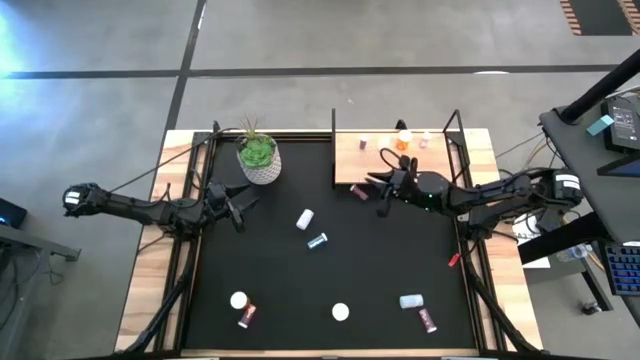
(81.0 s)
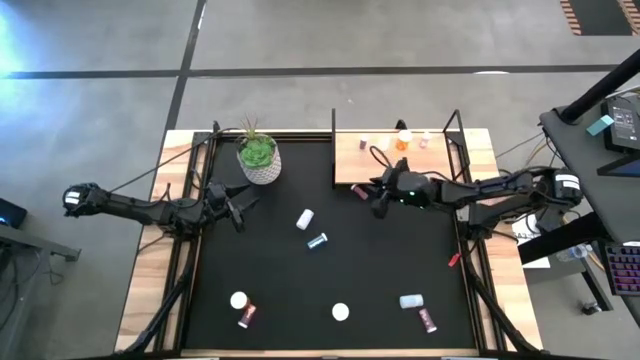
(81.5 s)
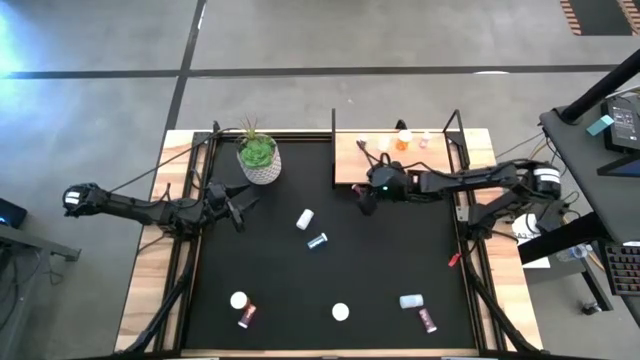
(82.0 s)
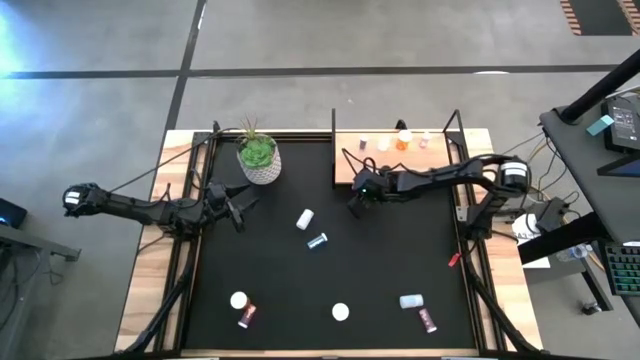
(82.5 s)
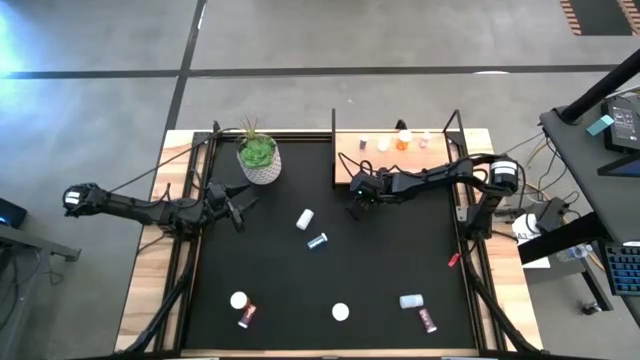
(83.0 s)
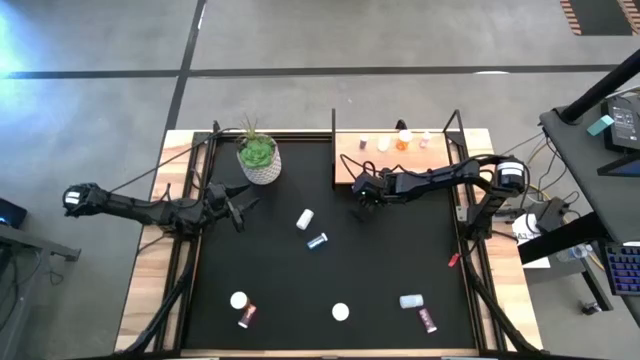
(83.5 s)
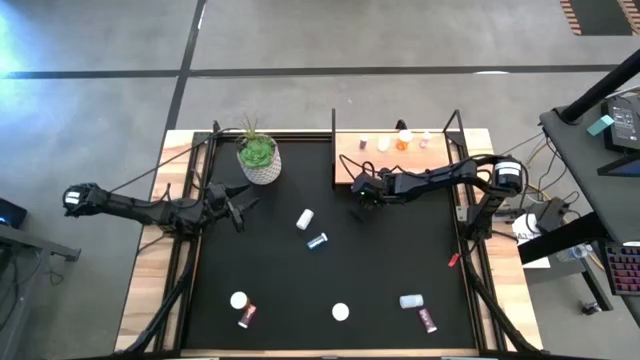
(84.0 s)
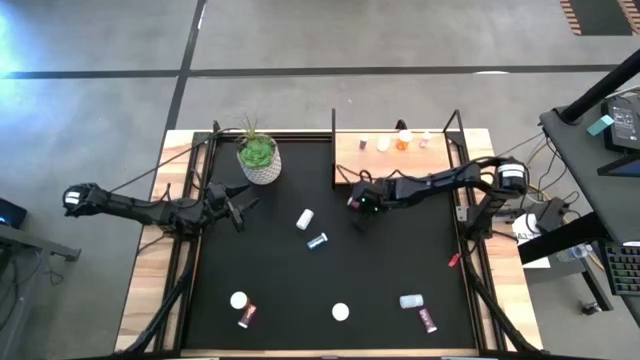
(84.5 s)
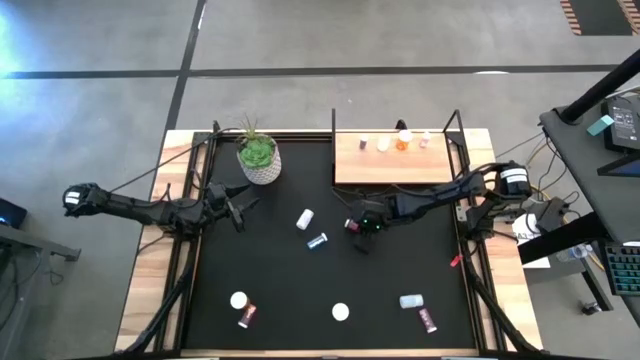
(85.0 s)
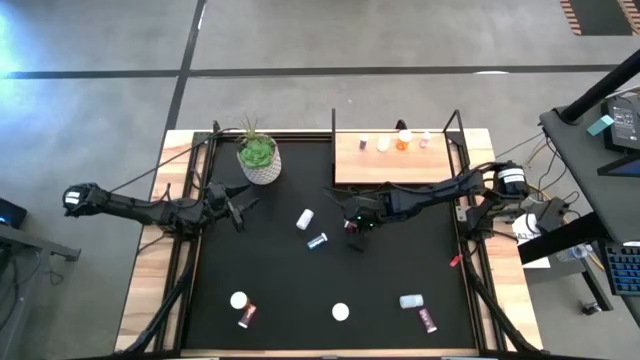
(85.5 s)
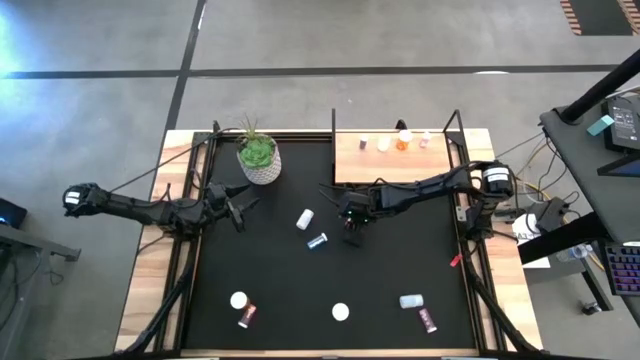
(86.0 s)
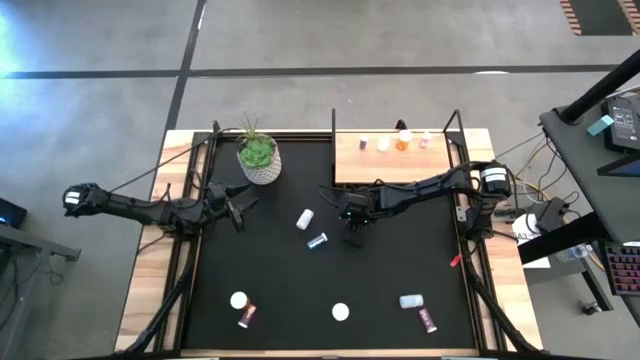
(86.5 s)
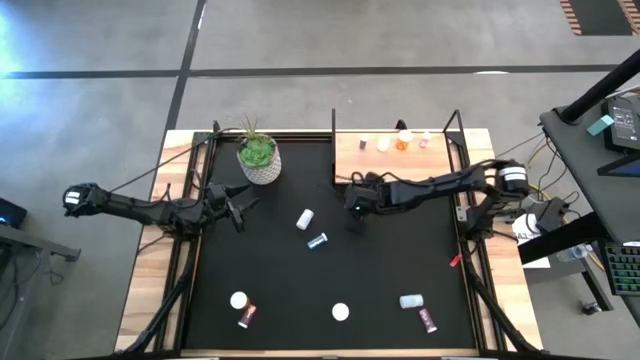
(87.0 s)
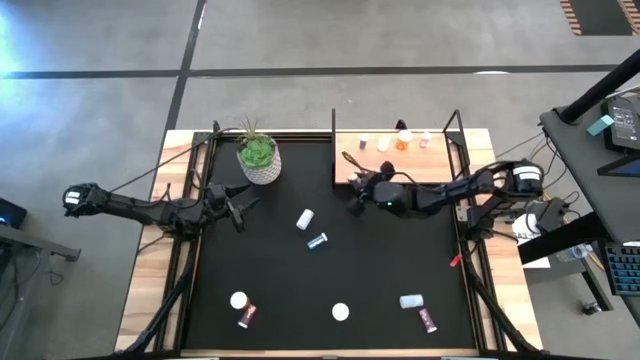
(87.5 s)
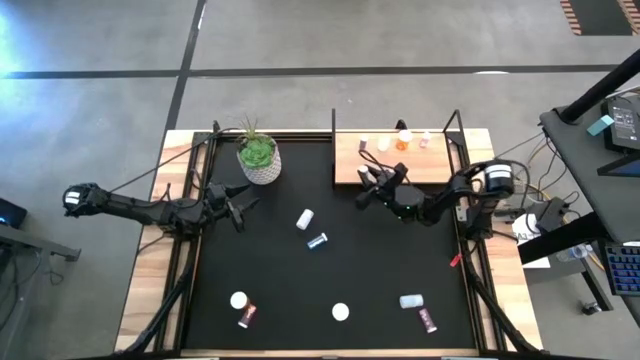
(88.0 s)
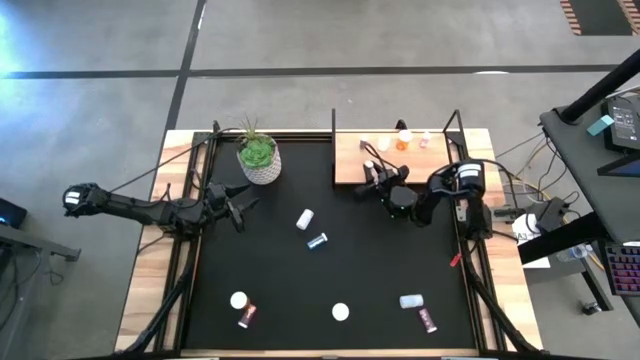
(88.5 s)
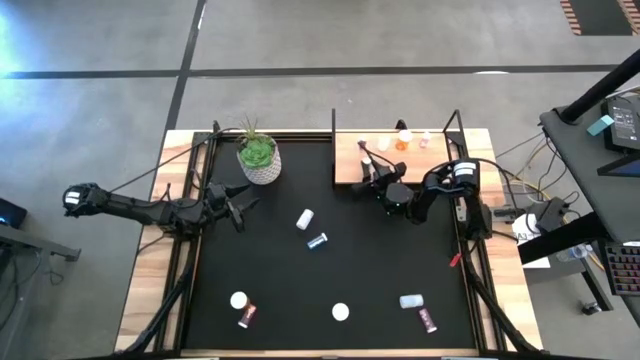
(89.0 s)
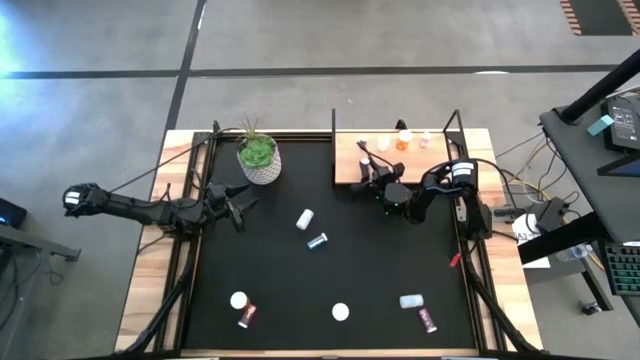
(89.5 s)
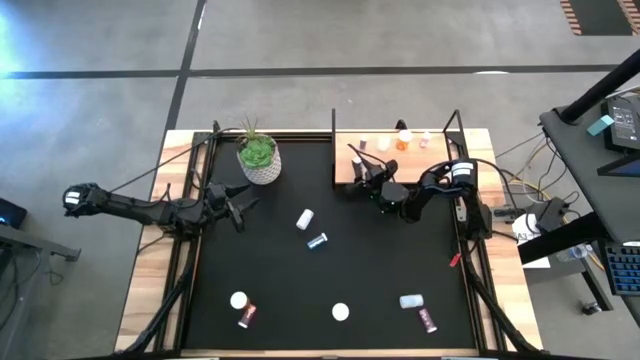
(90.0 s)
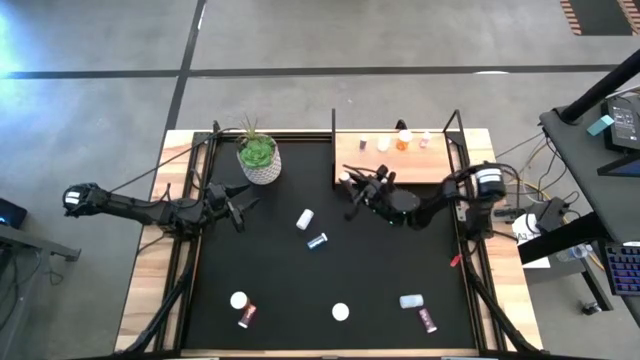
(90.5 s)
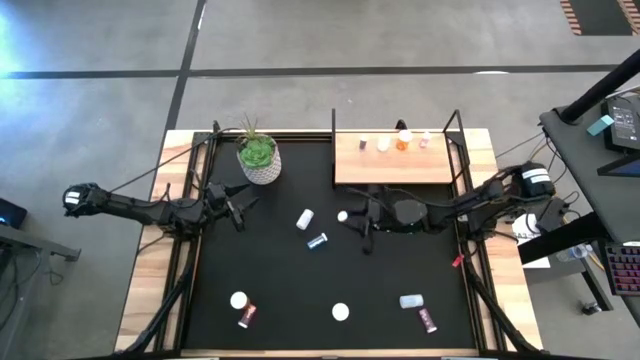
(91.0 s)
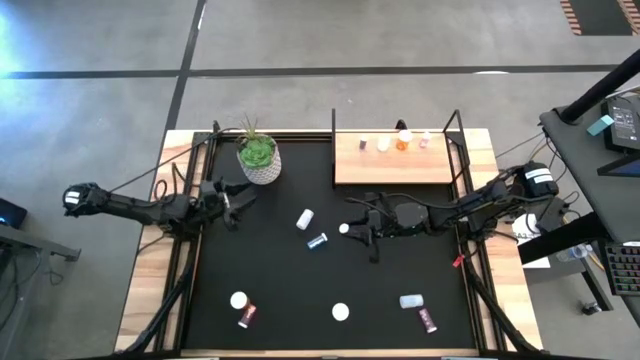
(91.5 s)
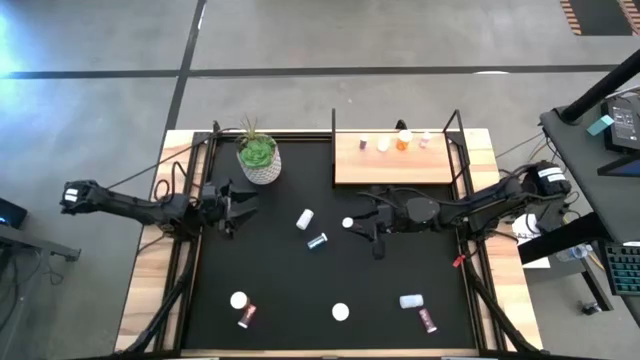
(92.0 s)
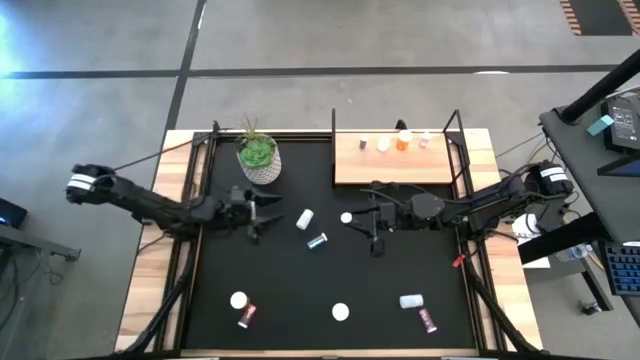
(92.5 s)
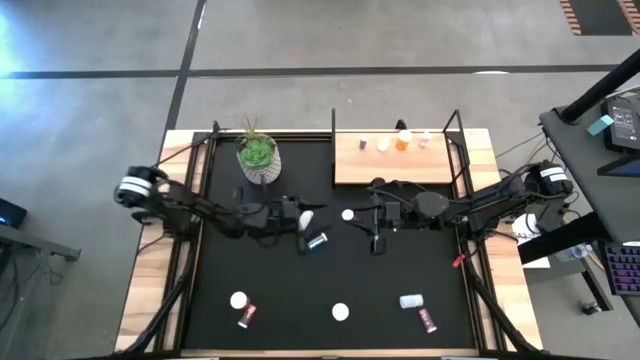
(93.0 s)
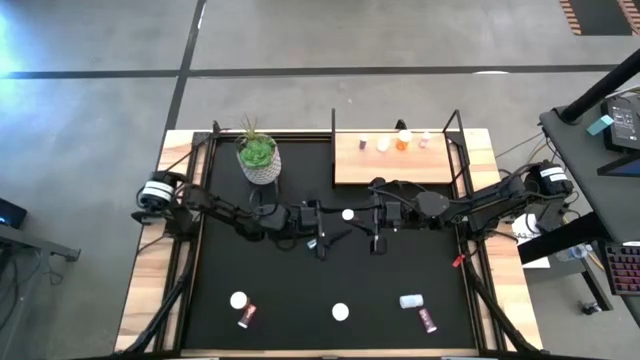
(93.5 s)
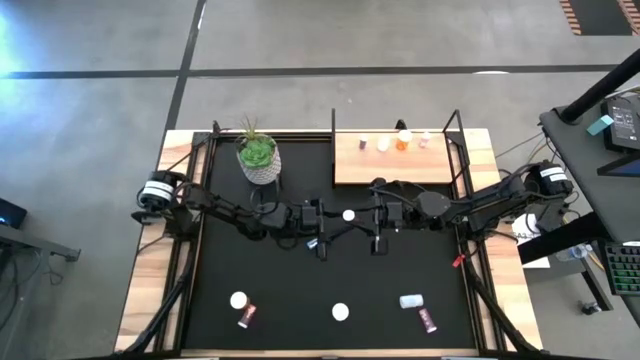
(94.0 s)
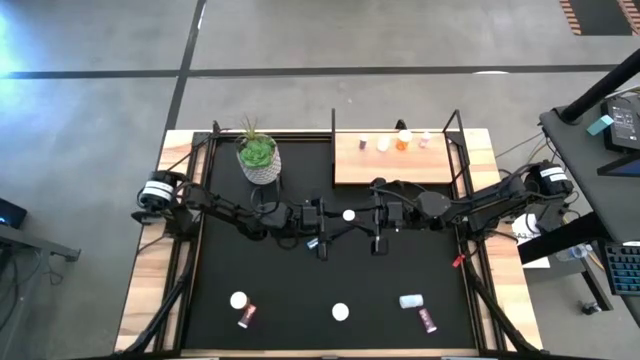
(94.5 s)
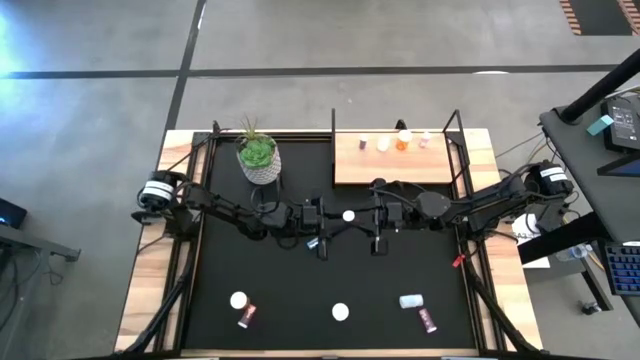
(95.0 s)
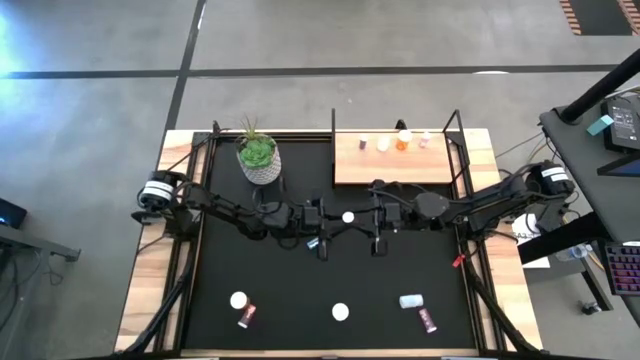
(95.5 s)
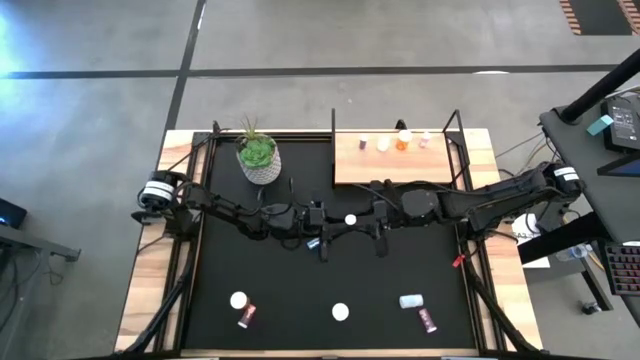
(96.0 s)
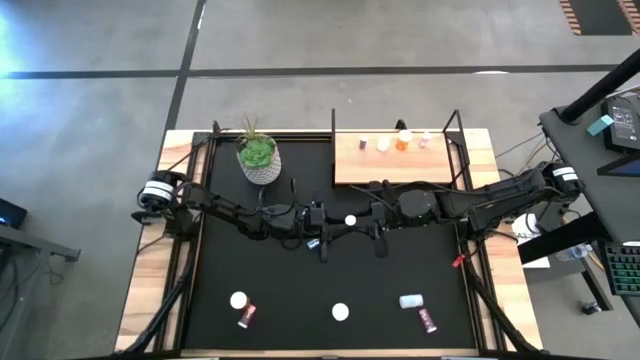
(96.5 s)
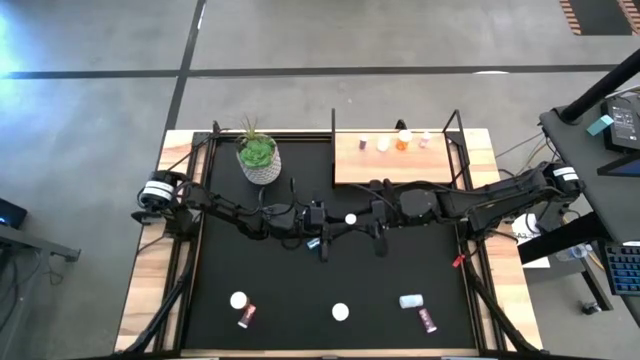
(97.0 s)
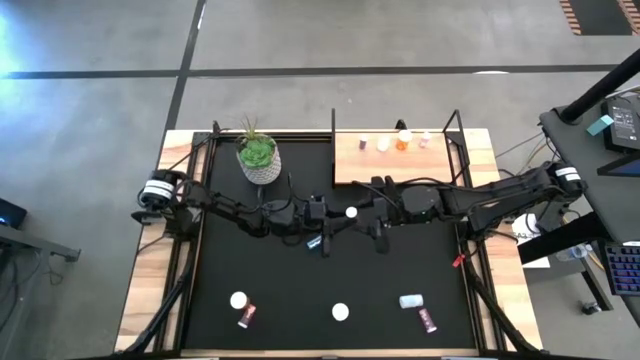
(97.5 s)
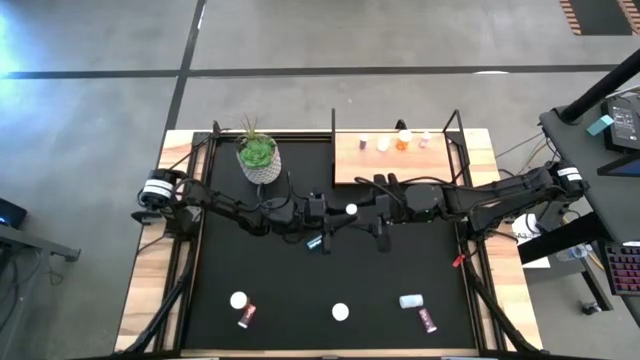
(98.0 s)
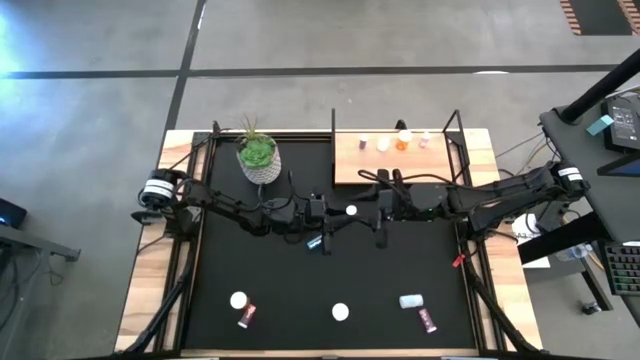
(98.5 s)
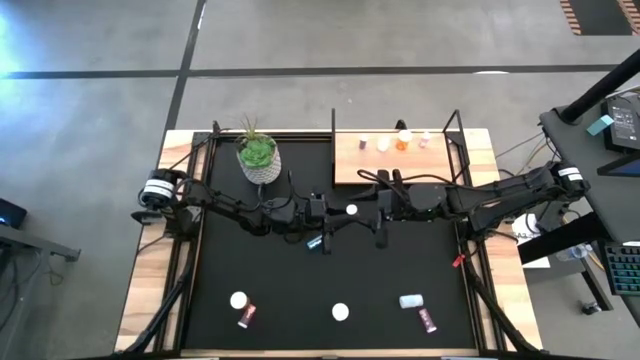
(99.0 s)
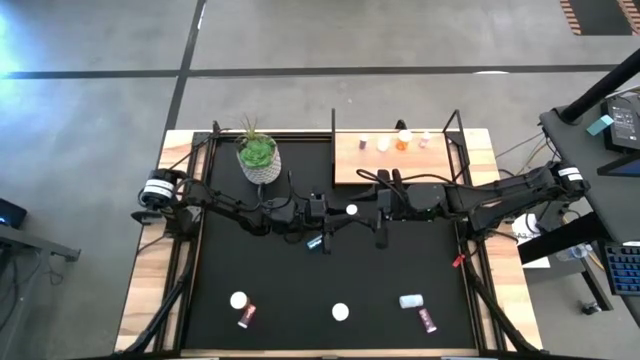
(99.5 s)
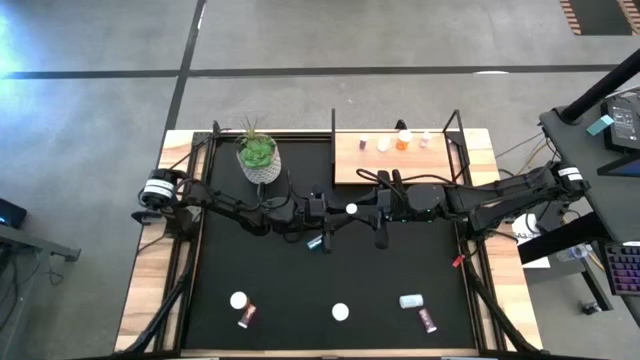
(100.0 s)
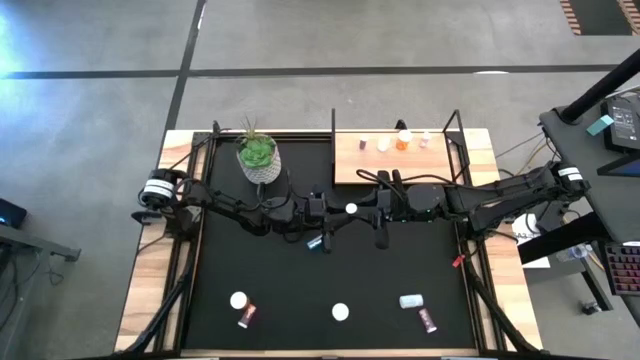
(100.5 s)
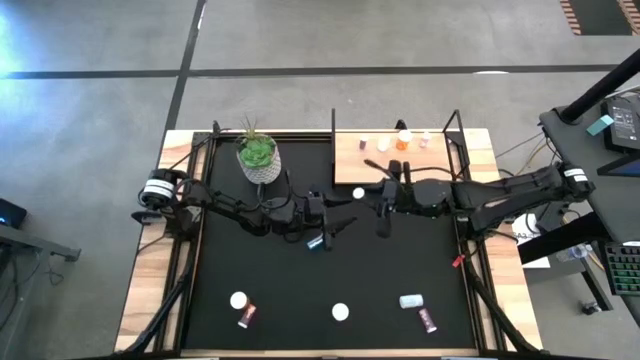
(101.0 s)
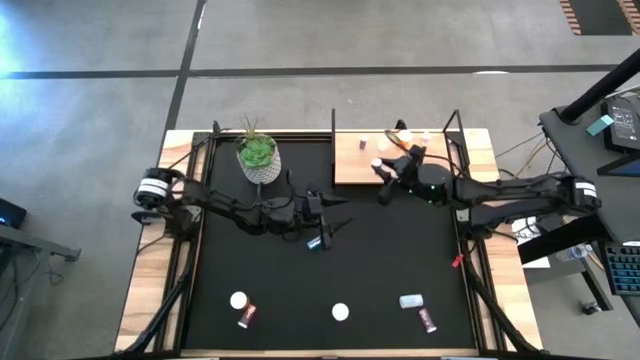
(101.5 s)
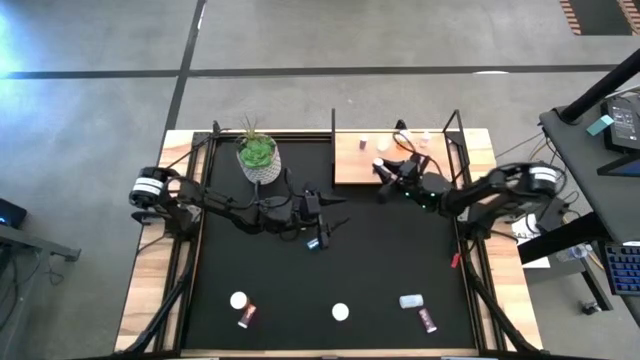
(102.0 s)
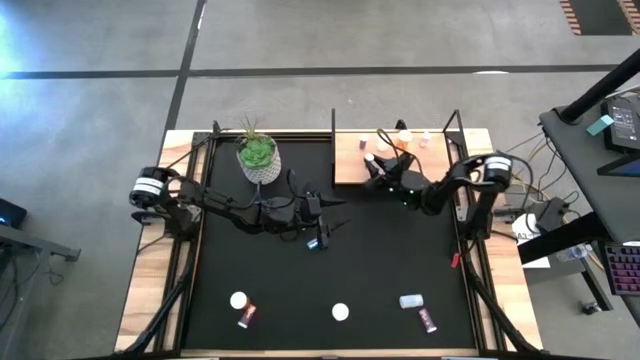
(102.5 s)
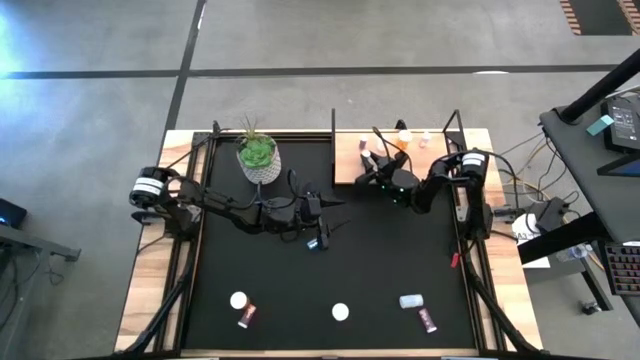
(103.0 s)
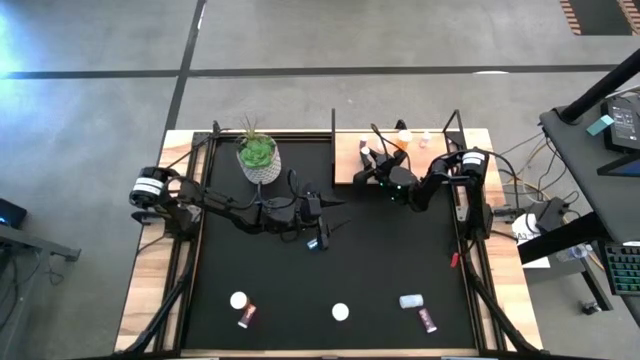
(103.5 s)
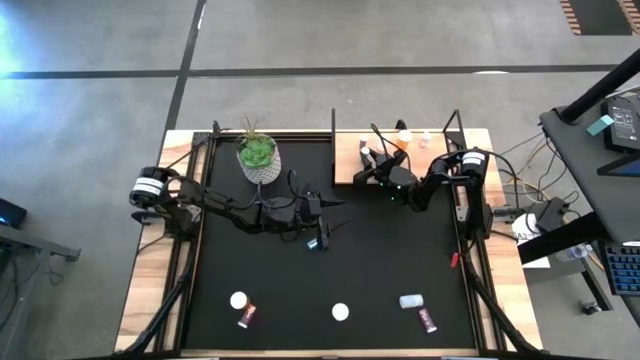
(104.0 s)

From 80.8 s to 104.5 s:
Task: Pick and place medicine bottles onto shelf by color
Put the right blue pill bottle on the shelf aligned with the other blue pill bottle
